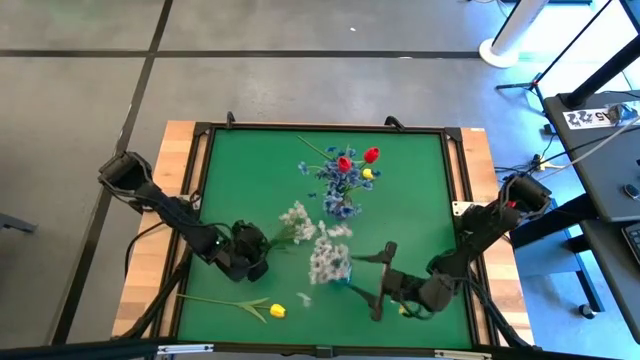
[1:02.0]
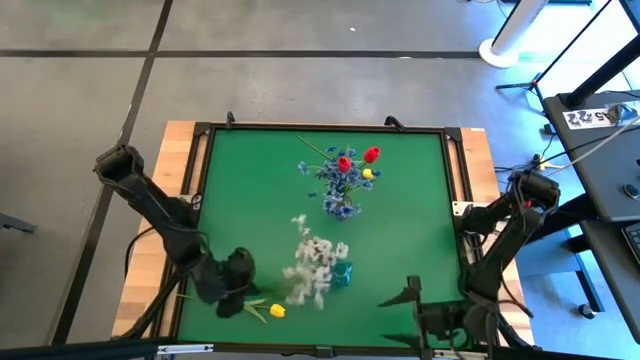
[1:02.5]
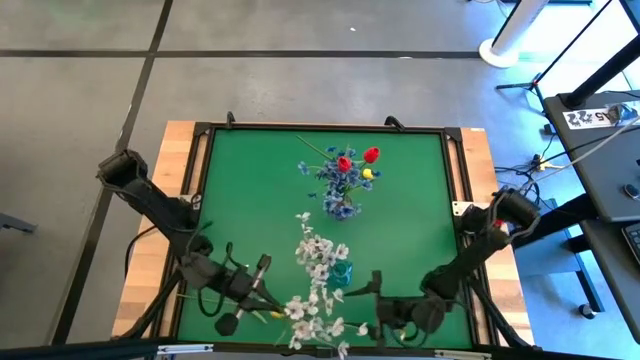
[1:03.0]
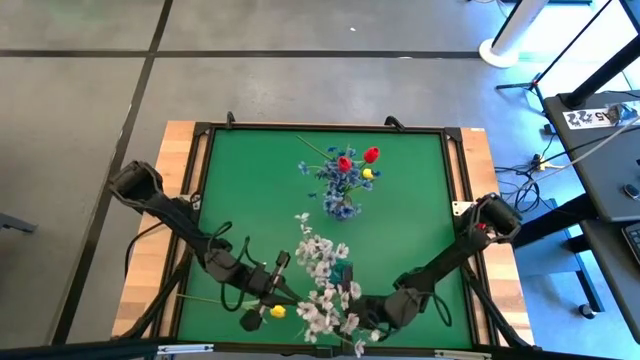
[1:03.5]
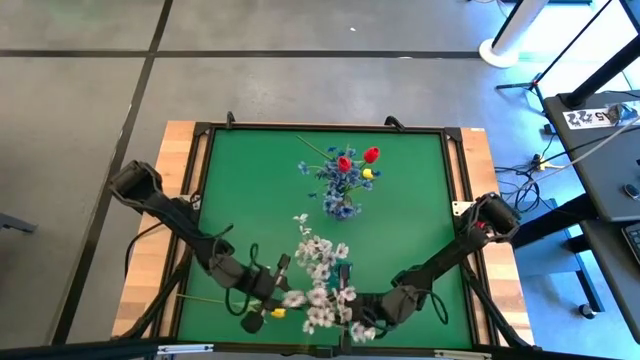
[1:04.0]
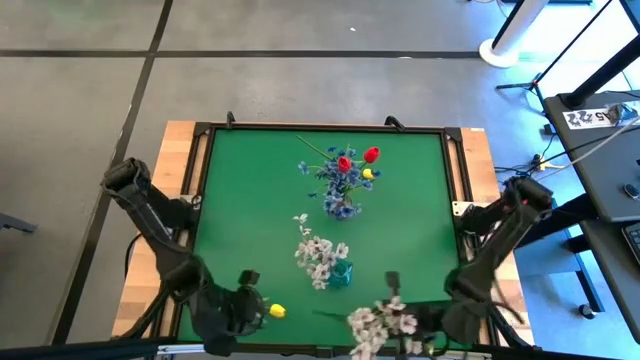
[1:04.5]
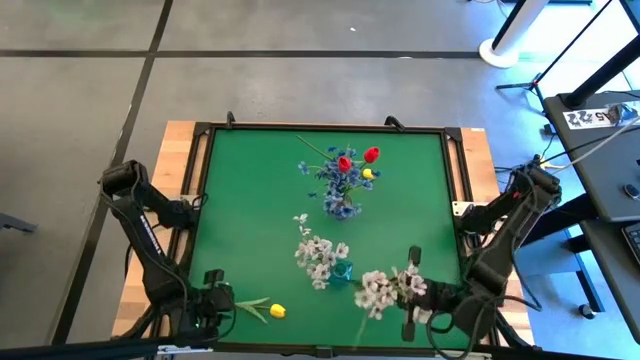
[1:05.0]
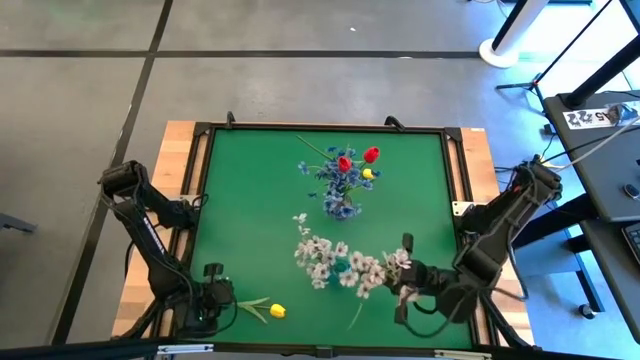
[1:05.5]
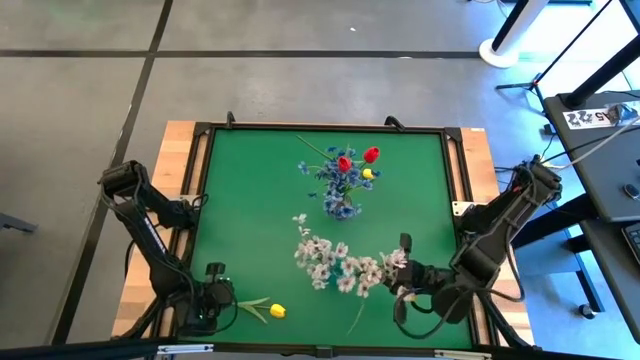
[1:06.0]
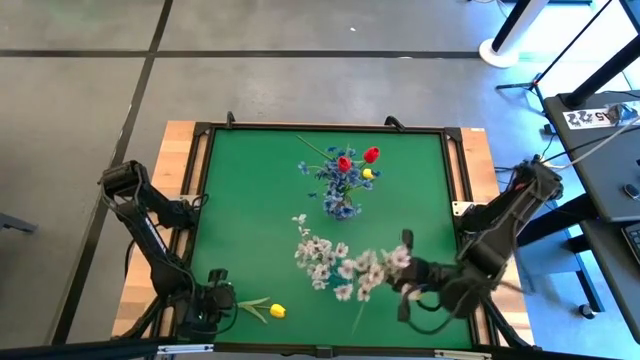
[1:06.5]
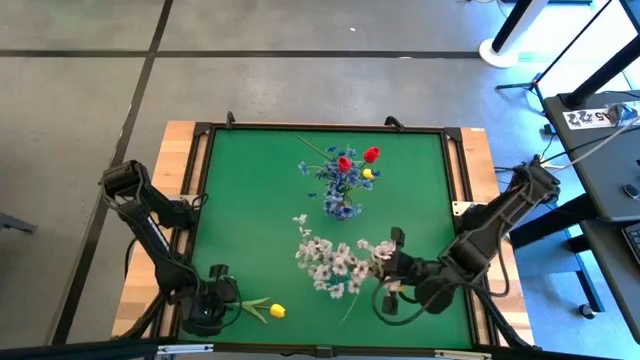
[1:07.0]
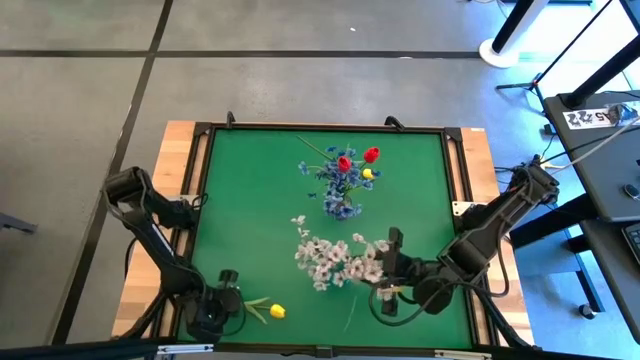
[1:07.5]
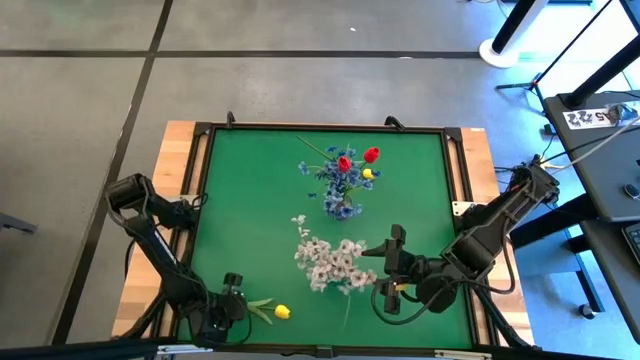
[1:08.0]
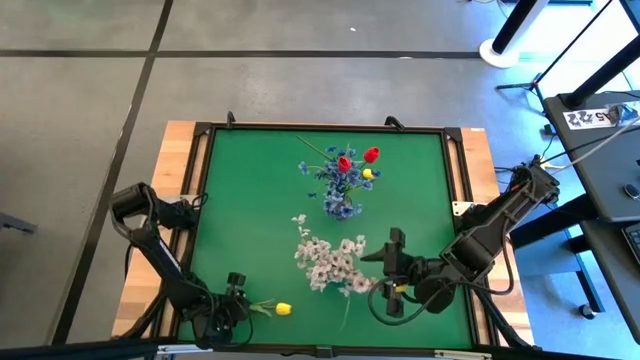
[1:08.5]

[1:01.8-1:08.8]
Task: Sort flowers into vase by color
Put the white flowers into the blue vase

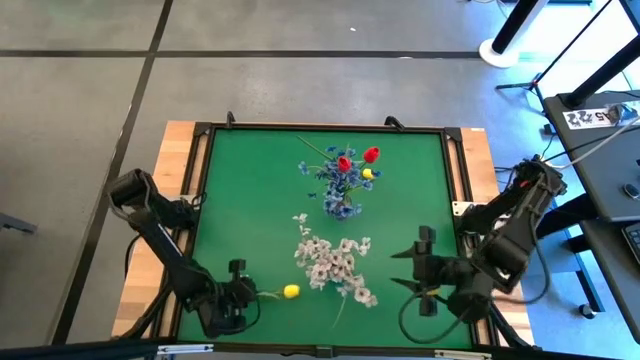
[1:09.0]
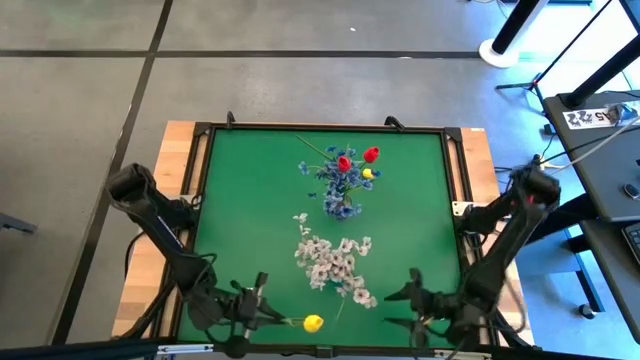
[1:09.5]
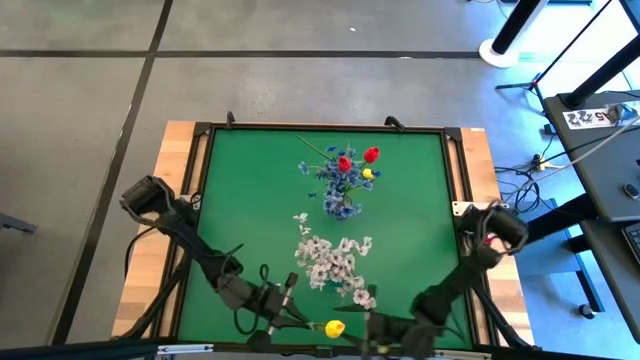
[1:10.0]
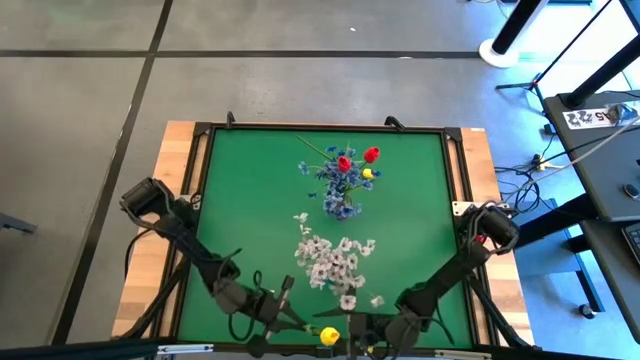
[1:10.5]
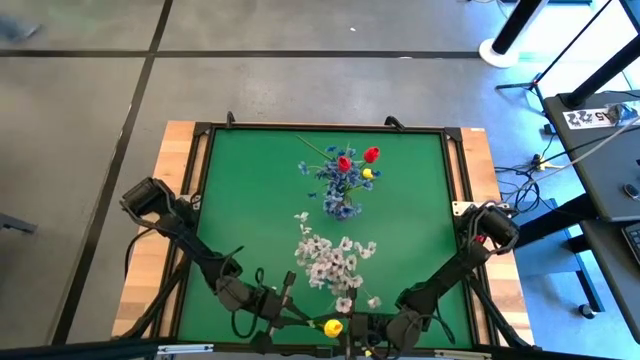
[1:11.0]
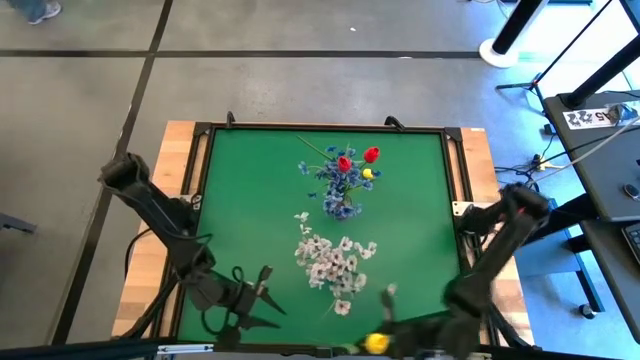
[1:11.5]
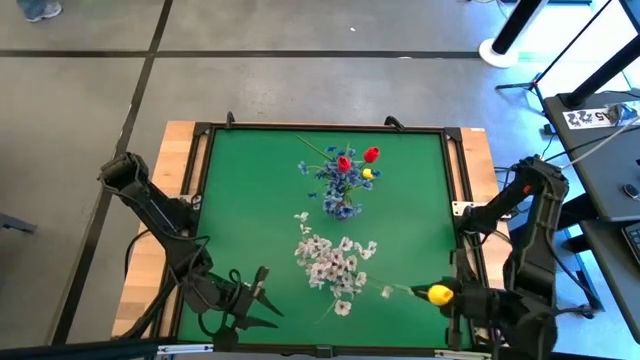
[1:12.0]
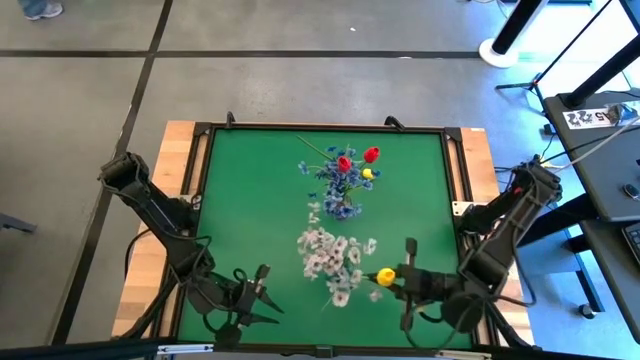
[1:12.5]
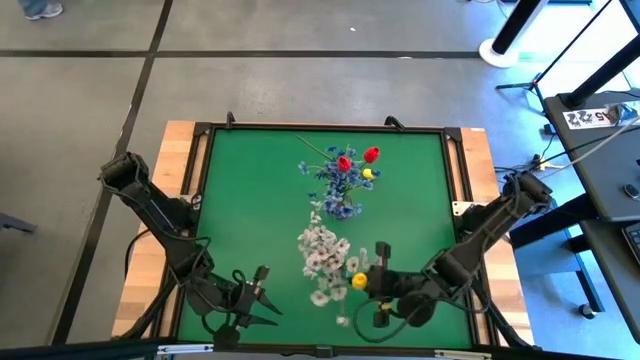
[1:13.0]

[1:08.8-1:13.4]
Put the bottom yellow flower into the blue vase

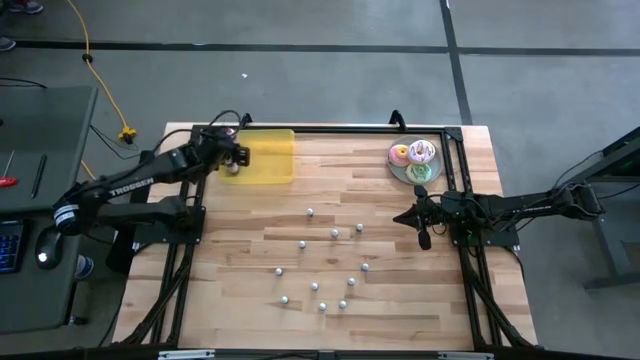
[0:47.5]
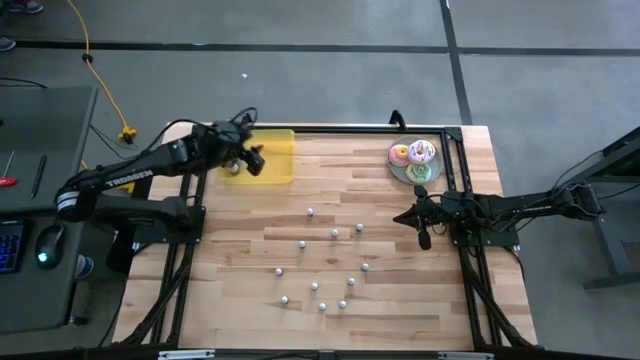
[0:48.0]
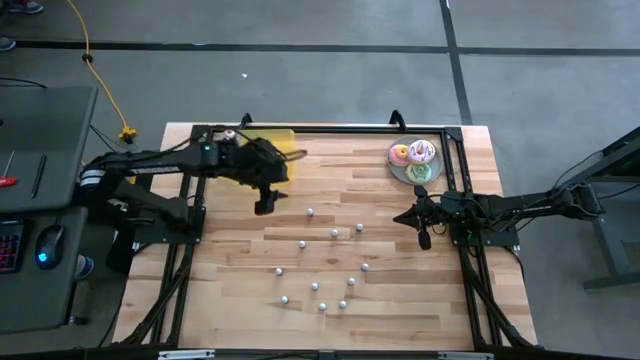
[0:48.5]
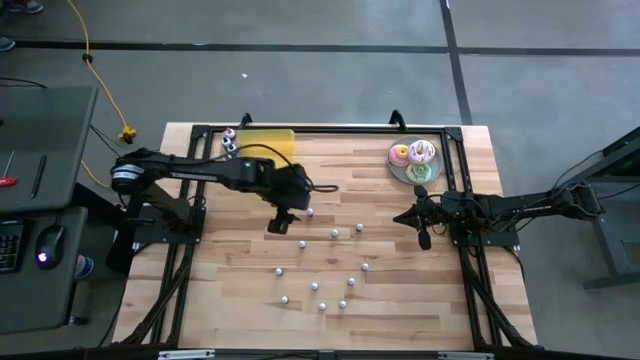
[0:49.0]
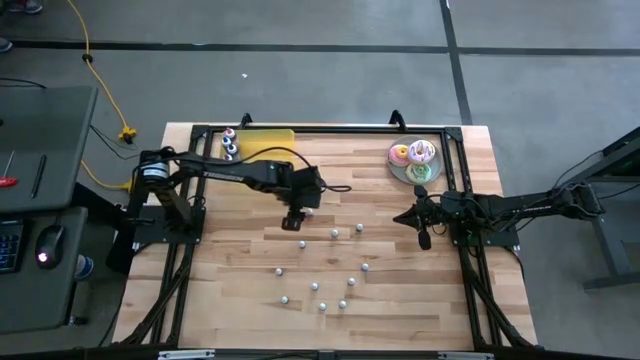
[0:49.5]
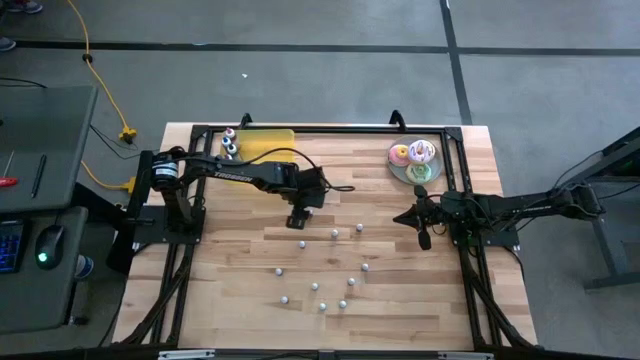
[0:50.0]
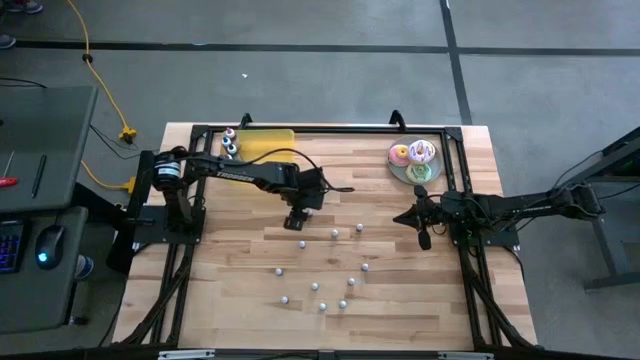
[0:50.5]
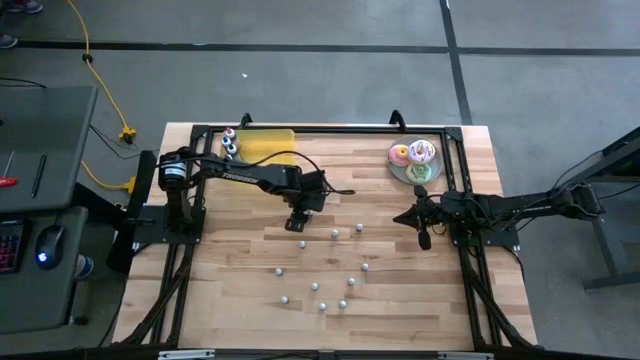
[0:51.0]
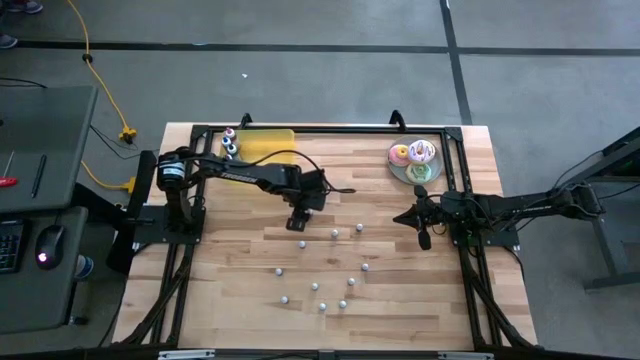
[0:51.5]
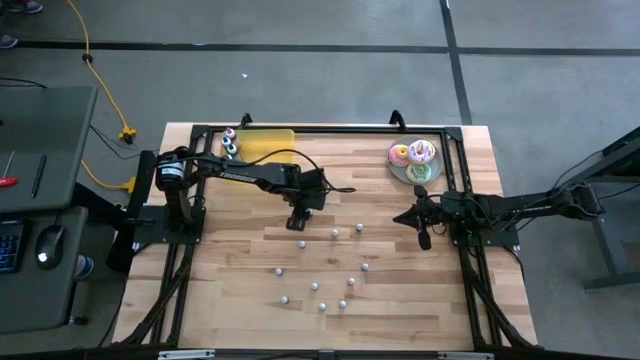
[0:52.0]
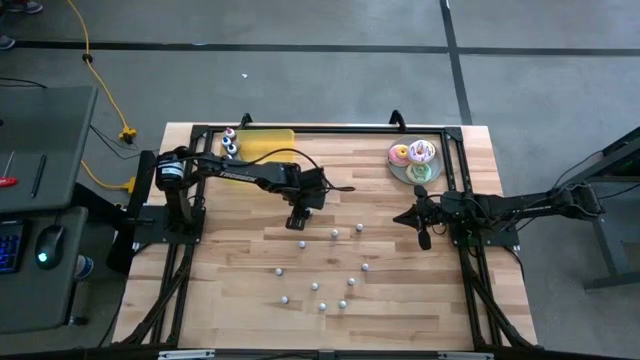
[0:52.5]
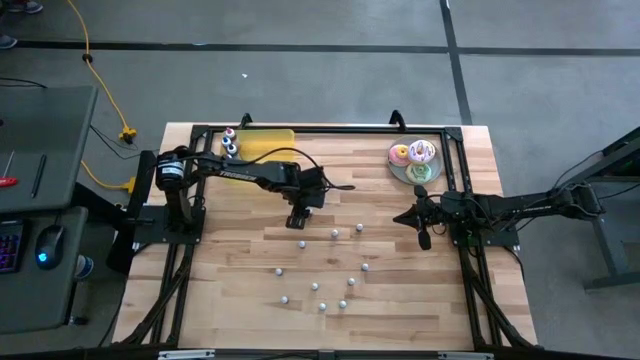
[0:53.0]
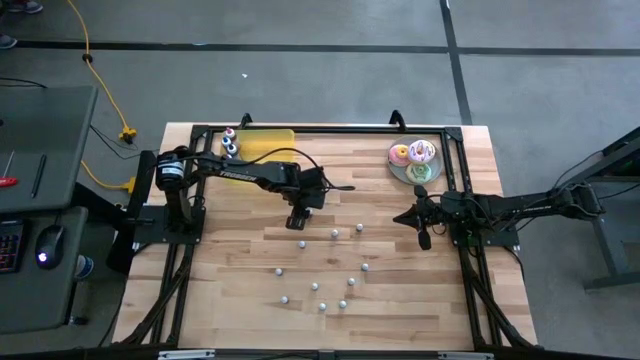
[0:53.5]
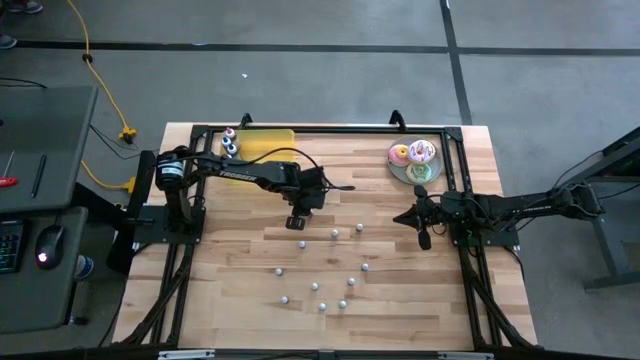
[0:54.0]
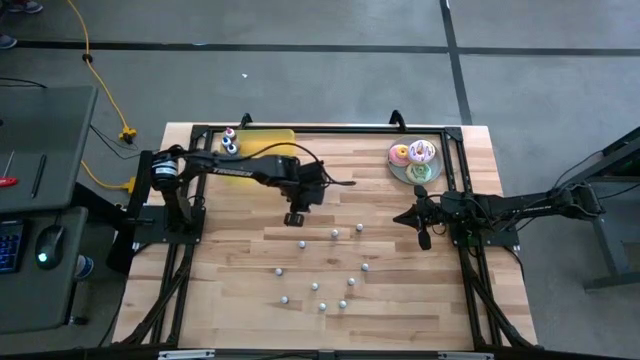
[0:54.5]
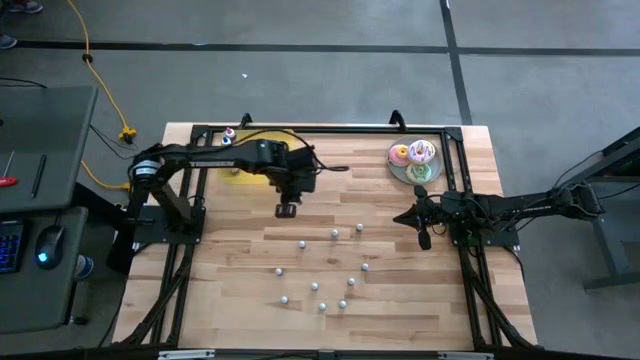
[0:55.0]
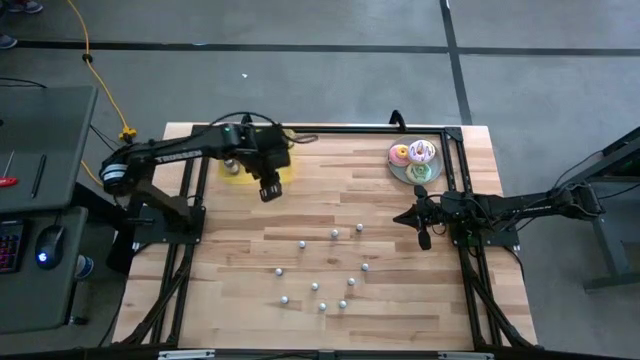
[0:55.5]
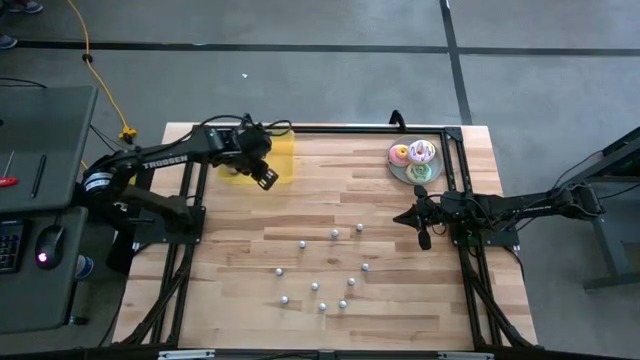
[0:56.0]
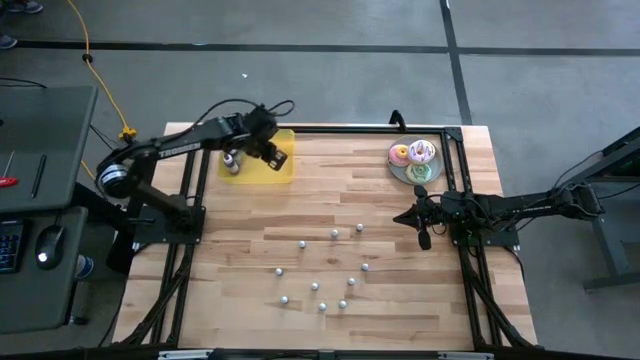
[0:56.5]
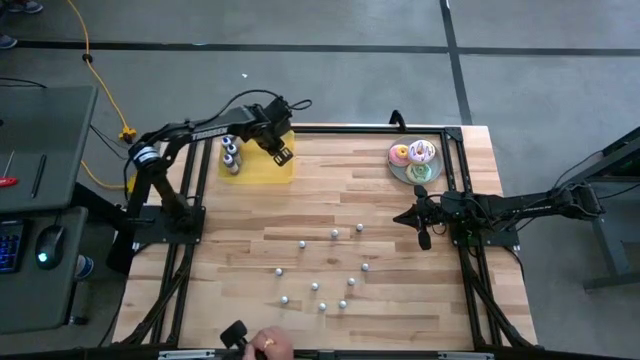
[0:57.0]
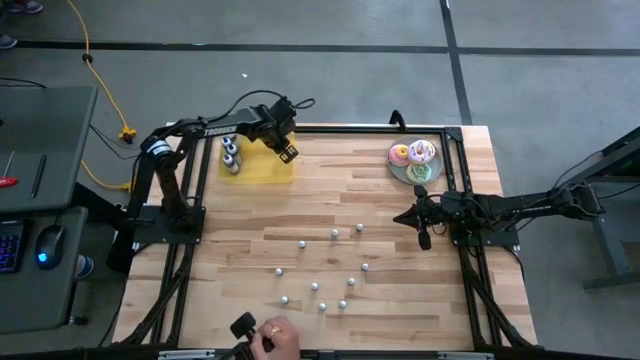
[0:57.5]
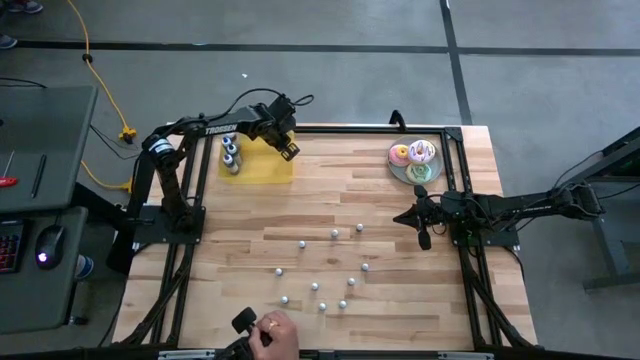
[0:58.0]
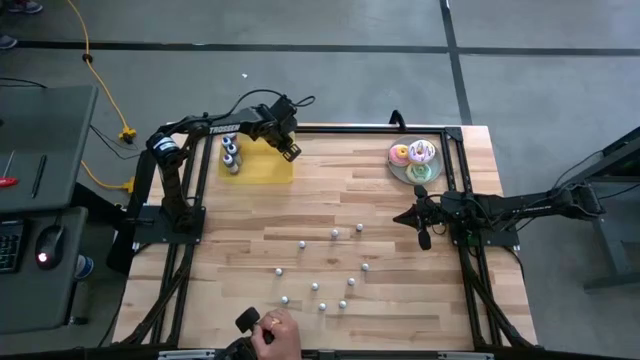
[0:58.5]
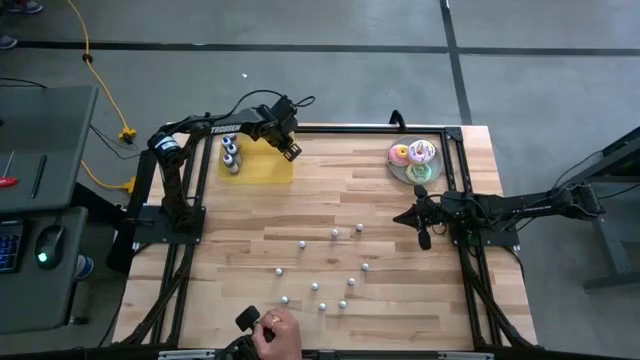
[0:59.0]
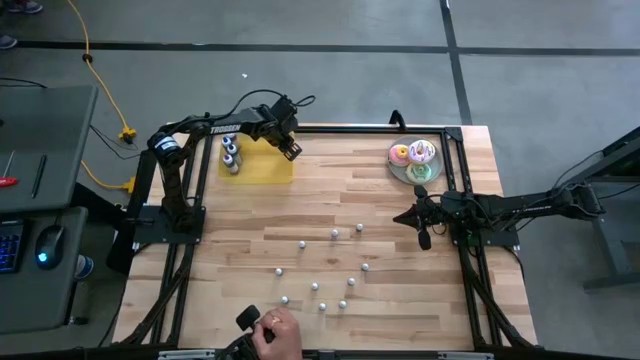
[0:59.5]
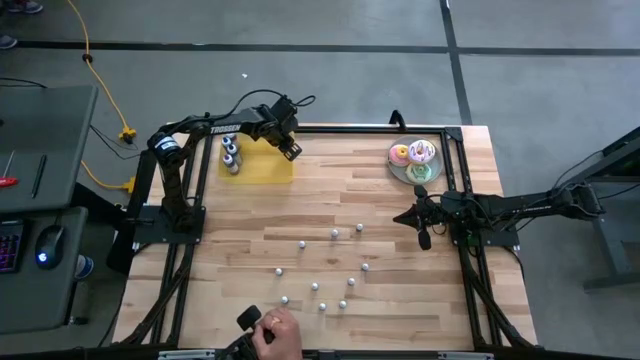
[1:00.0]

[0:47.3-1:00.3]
Task: Pick & Place food coloring
Put the small orange food coloring bottle into the yellow bin
